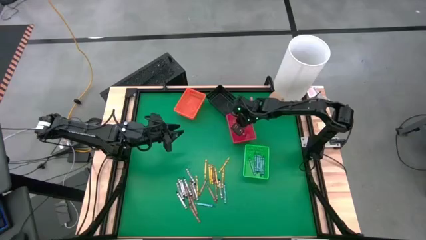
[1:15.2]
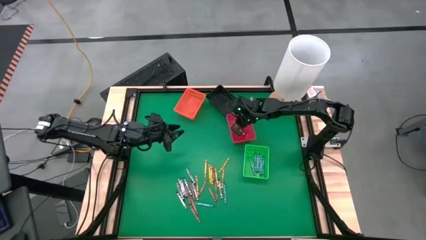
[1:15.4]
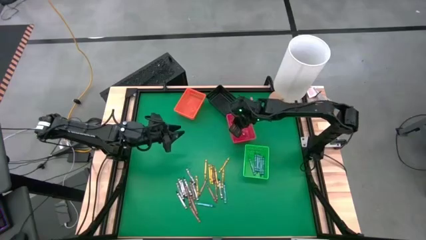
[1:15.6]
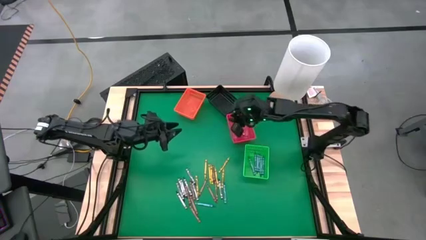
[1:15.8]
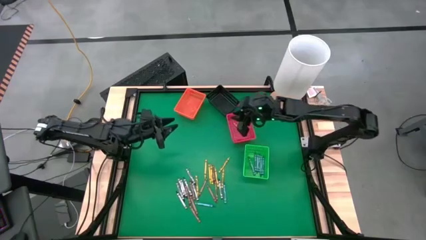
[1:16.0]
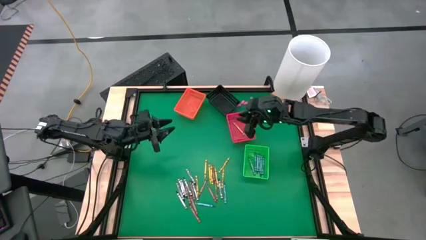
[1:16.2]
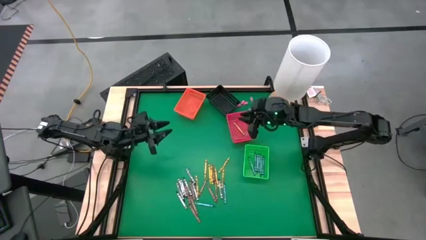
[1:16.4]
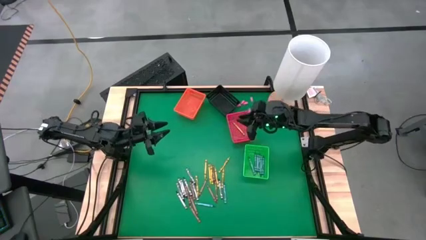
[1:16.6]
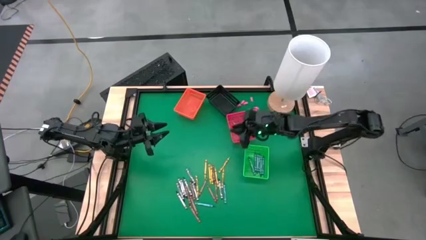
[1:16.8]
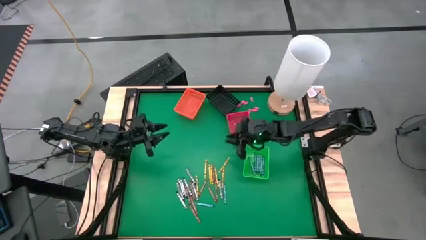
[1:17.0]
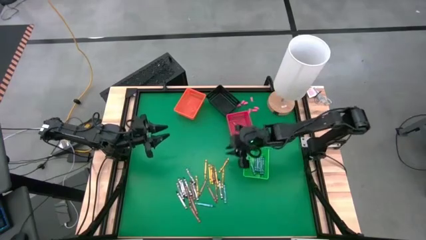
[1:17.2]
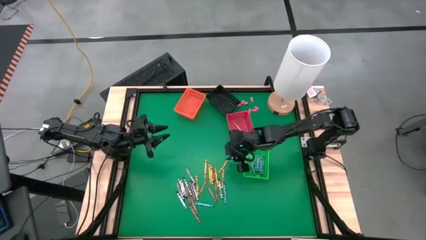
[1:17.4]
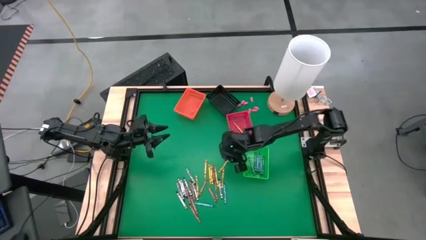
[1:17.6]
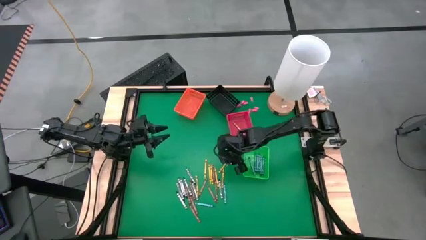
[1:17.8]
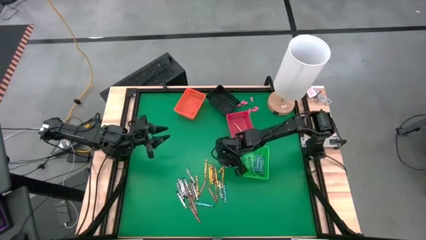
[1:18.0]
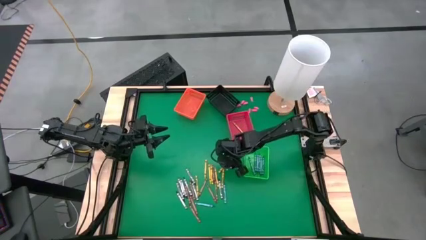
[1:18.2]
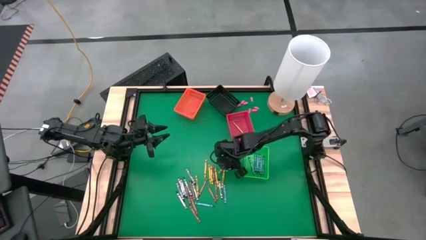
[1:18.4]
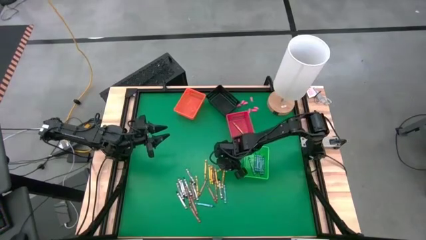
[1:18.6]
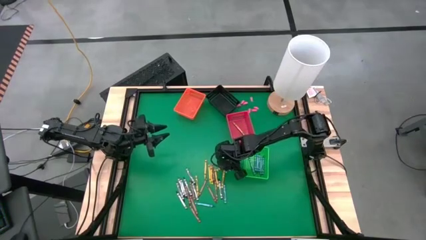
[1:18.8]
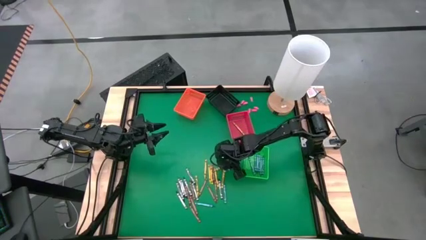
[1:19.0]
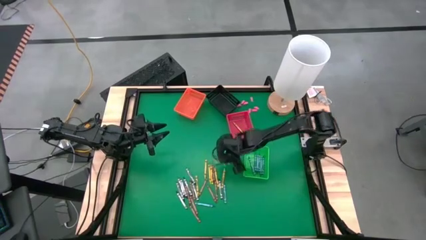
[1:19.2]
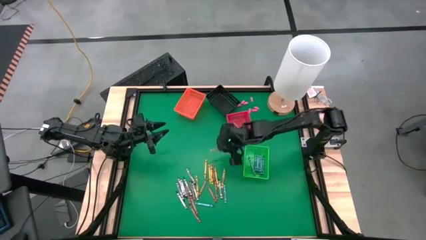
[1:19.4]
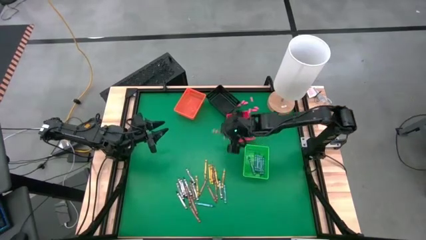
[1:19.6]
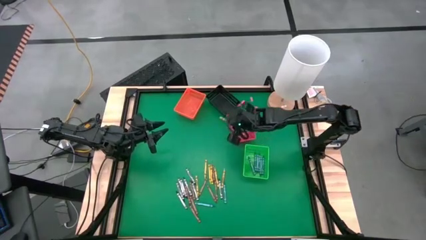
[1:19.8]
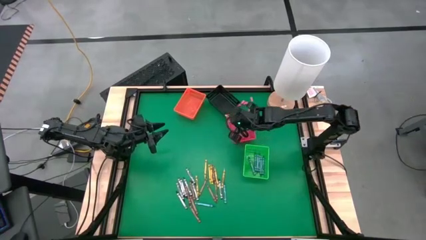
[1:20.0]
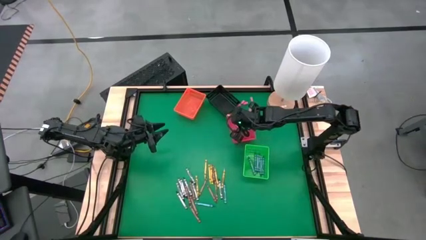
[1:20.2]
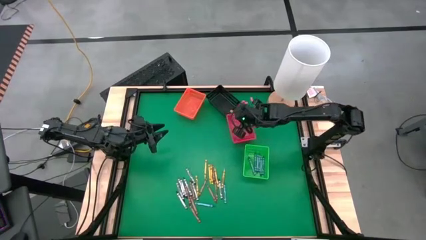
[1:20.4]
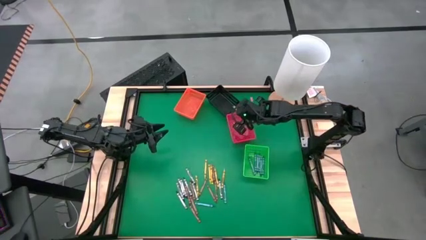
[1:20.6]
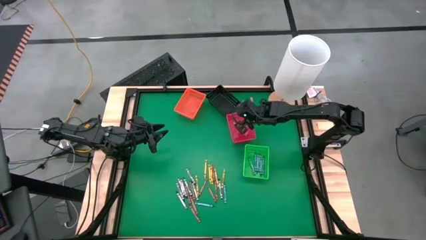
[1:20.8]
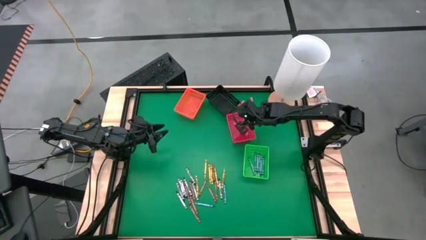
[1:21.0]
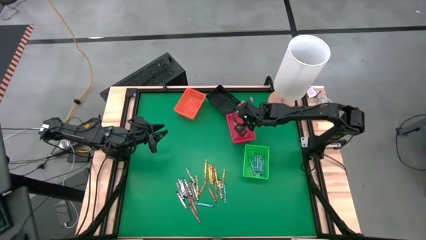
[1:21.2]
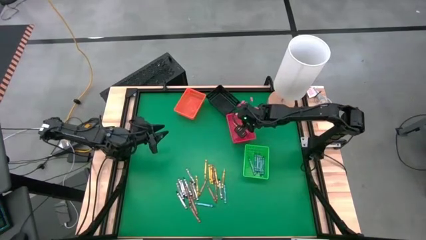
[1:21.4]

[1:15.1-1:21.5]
Task: Sort crayons
Put the yellow crayon into the red bin

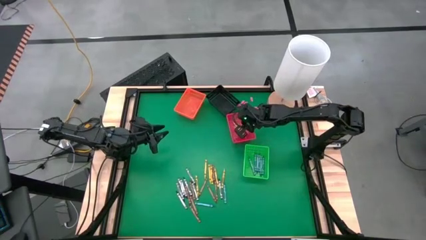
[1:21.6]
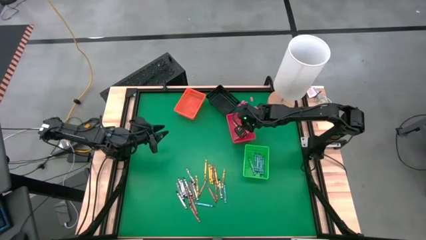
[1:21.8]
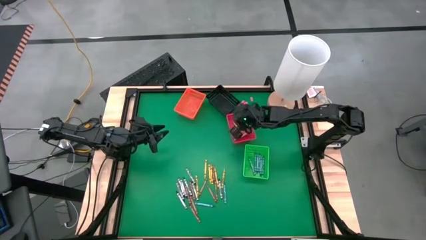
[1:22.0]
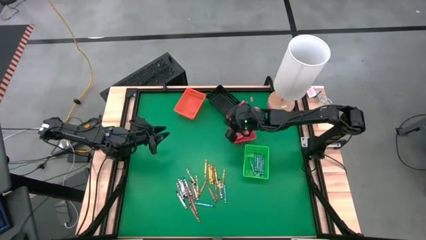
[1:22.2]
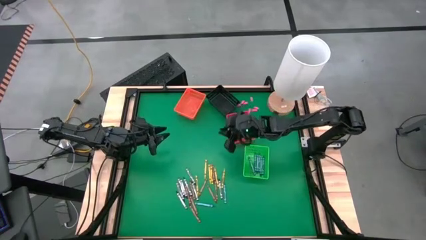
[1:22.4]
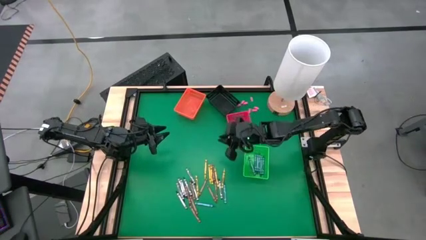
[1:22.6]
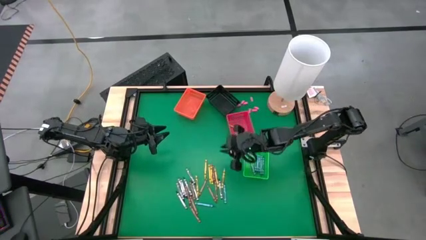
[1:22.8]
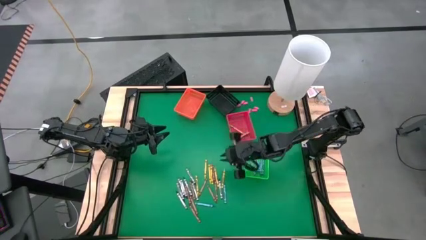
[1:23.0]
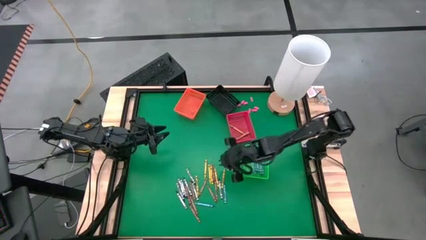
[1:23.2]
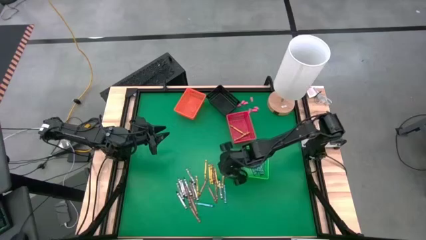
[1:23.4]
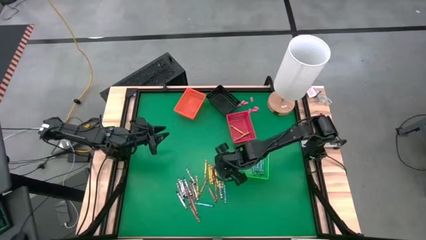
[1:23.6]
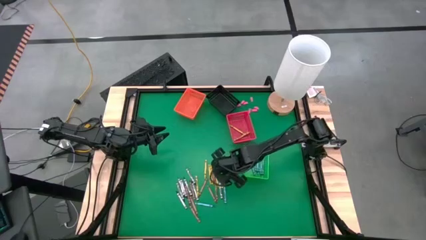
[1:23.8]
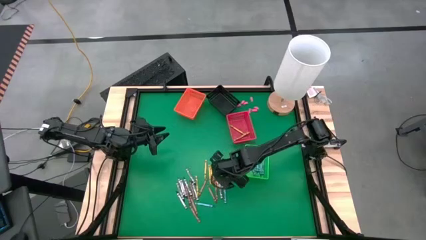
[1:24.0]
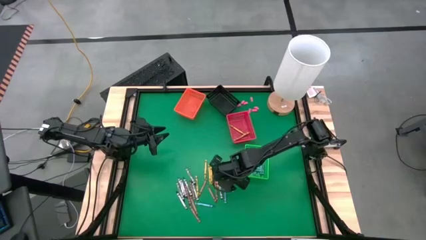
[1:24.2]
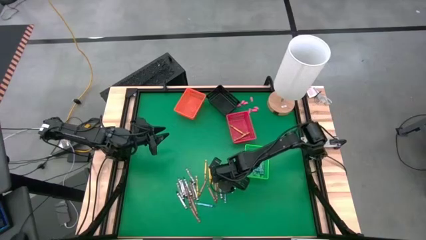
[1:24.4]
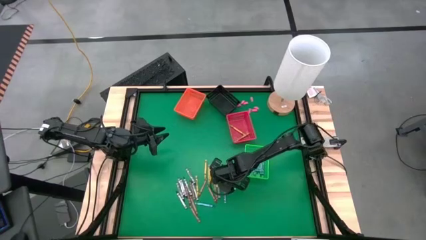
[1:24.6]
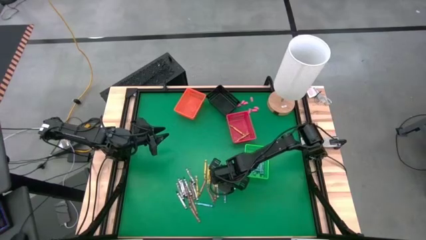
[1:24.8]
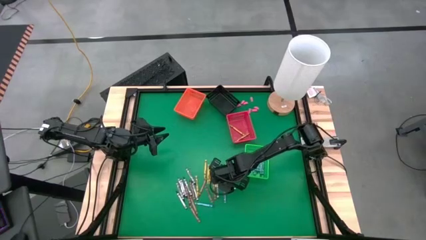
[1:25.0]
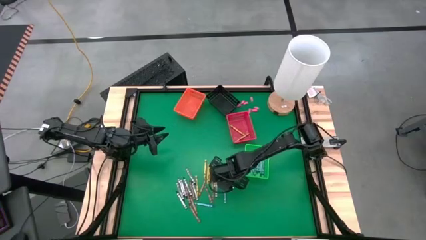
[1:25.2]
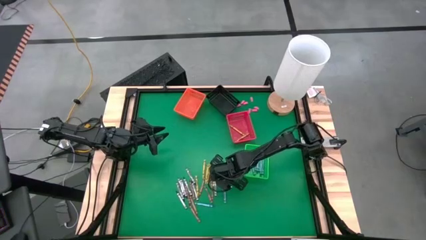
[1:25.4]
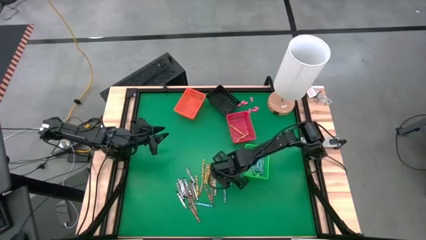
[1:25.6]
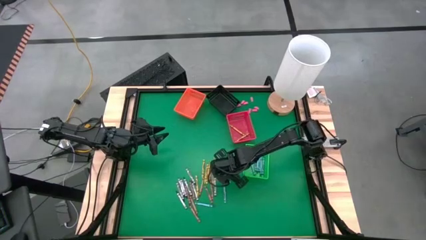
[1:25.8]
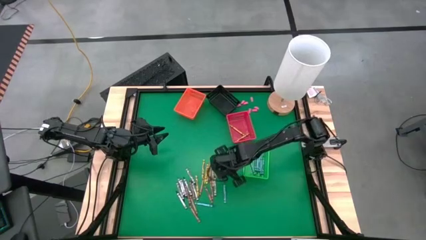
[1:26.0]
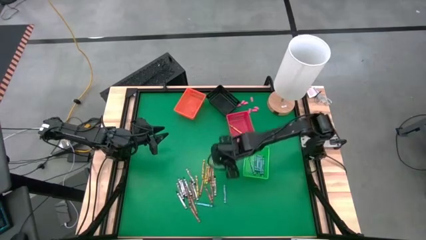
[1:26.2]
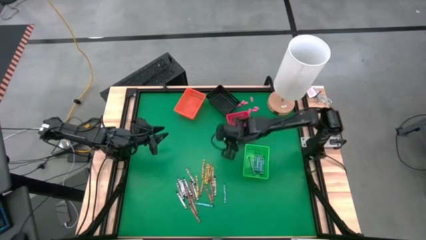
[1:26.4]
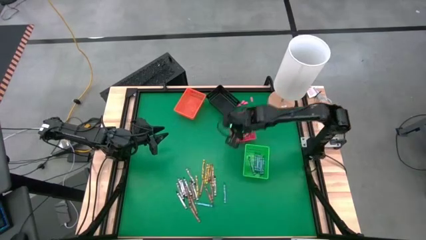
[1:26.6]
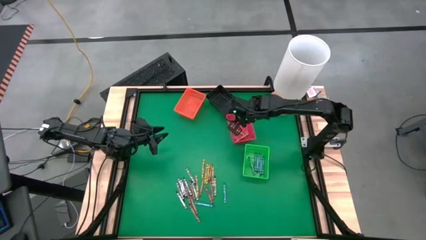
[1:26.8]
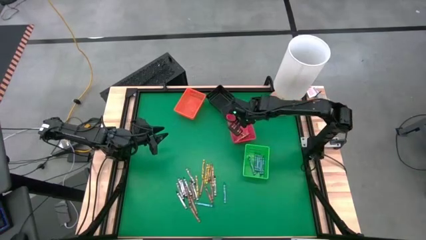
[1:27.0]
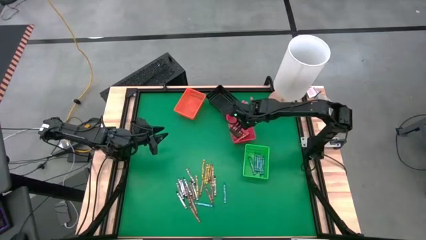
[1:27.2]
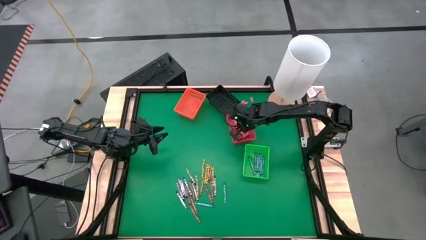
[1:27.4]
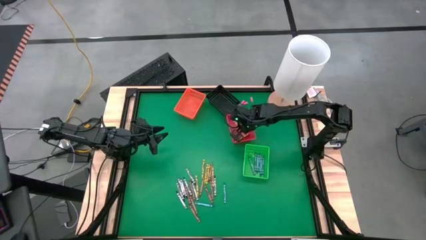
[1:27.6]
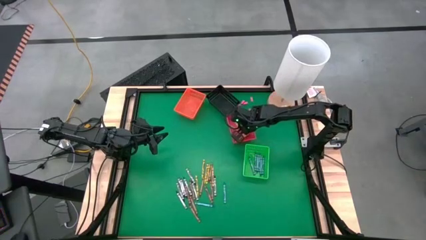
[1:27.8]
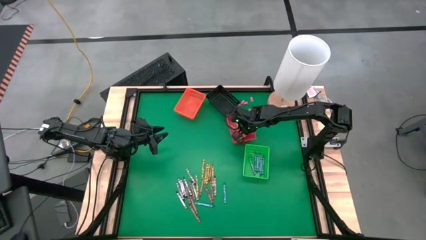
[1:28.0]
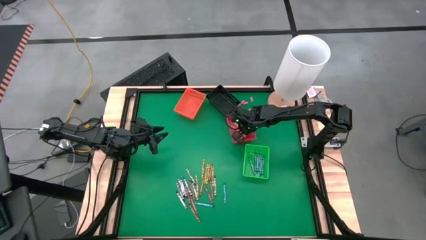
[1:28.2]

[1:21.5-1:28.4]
Put the yellow crayon into the red bin
